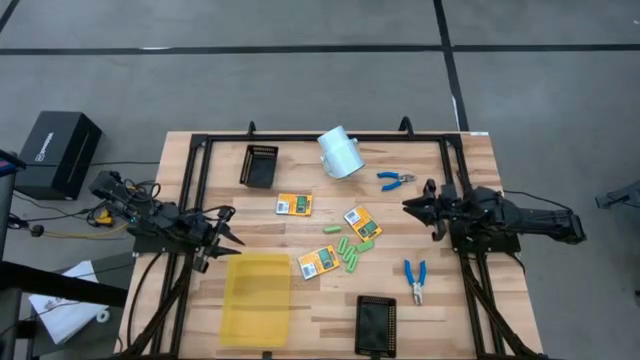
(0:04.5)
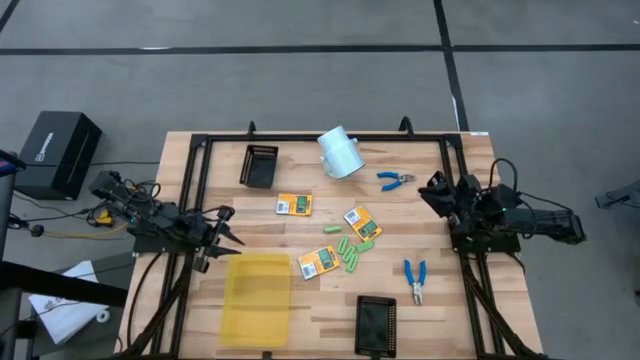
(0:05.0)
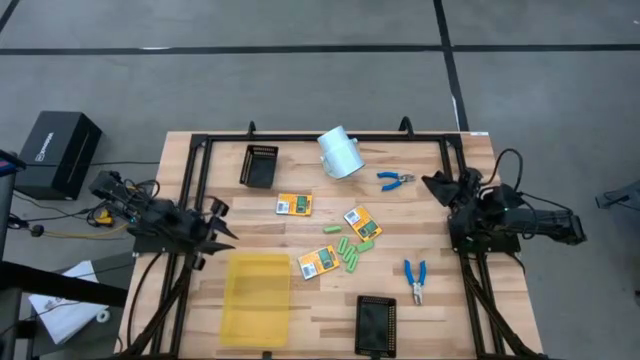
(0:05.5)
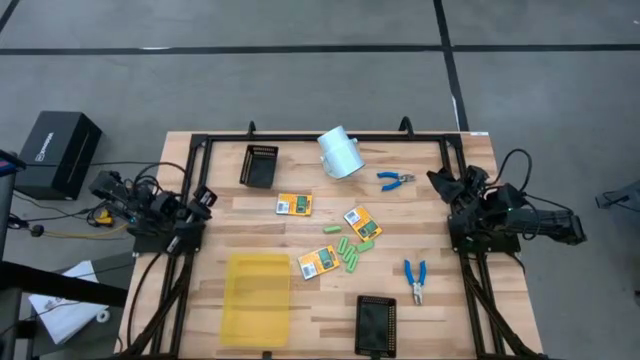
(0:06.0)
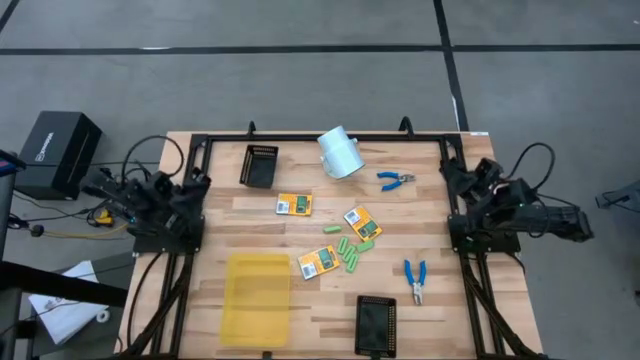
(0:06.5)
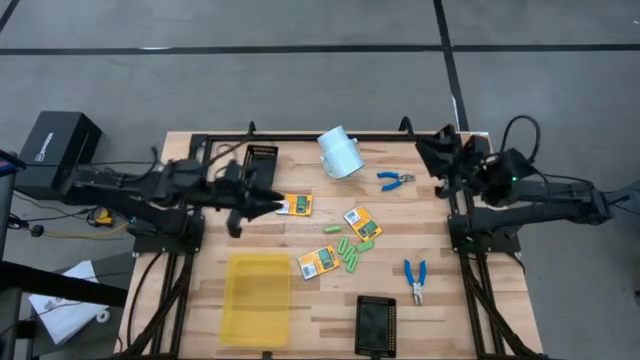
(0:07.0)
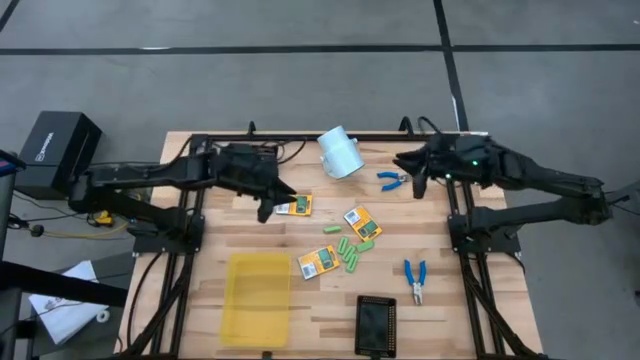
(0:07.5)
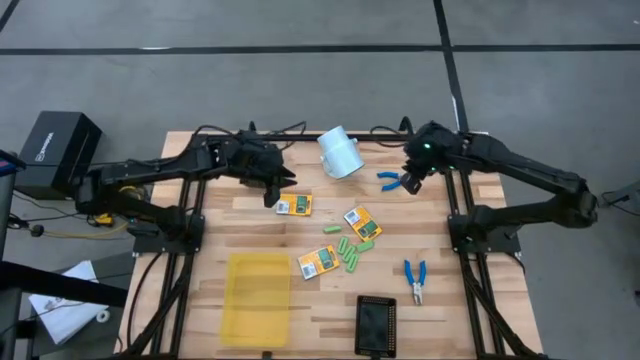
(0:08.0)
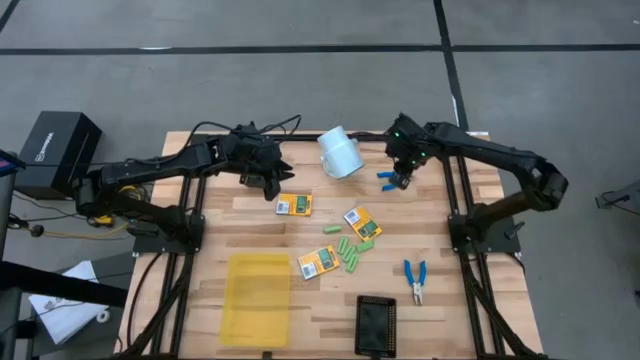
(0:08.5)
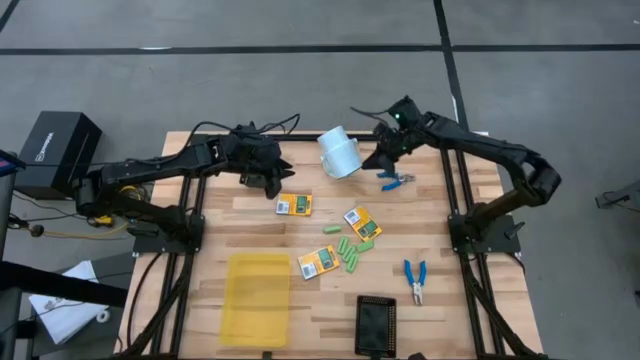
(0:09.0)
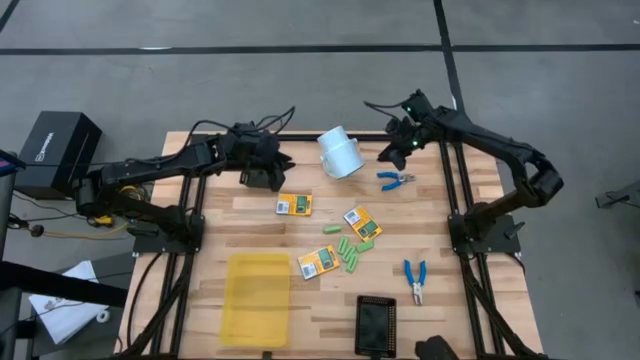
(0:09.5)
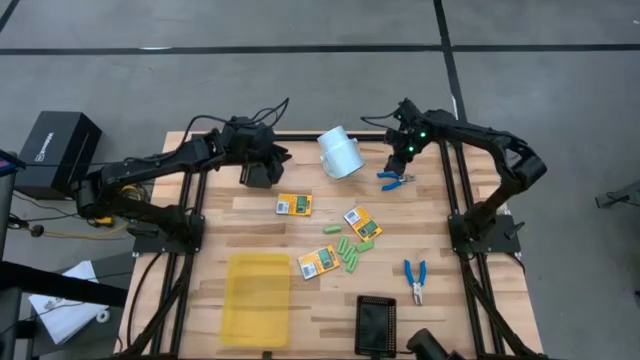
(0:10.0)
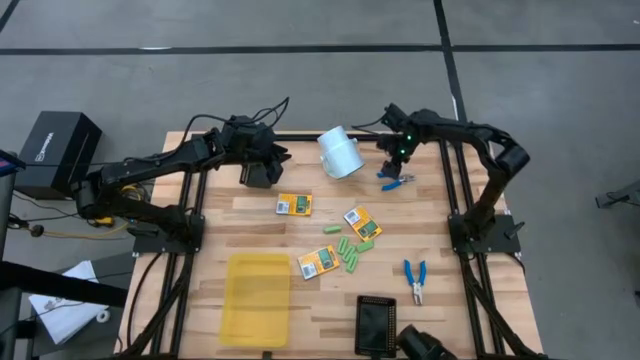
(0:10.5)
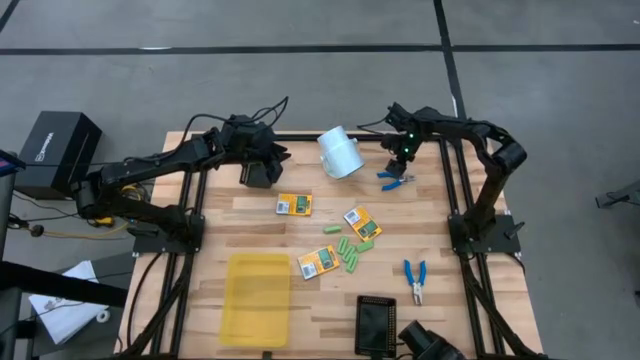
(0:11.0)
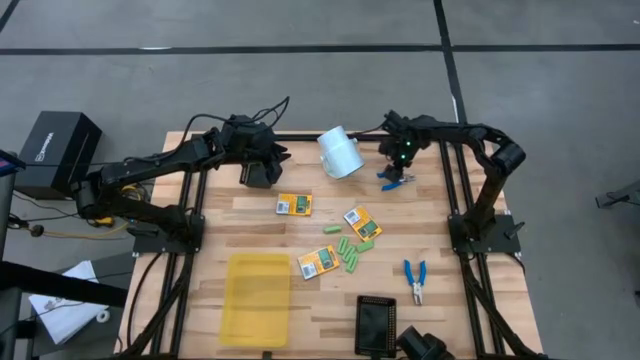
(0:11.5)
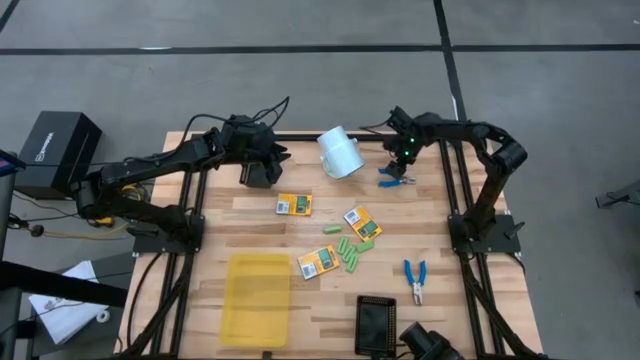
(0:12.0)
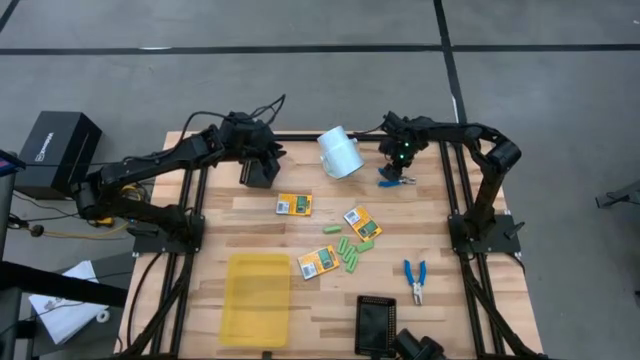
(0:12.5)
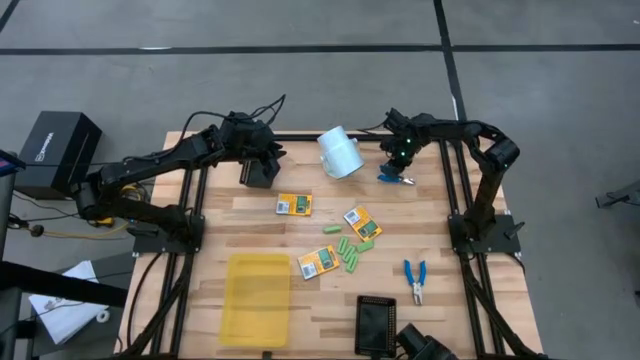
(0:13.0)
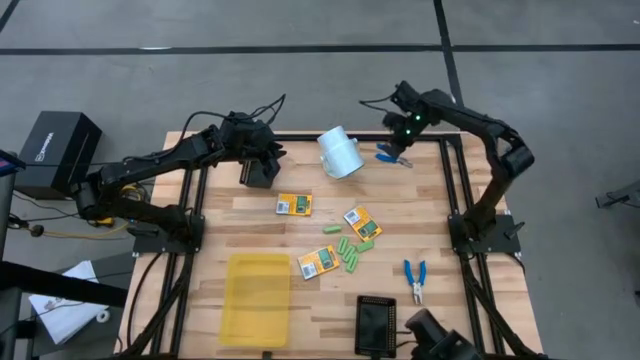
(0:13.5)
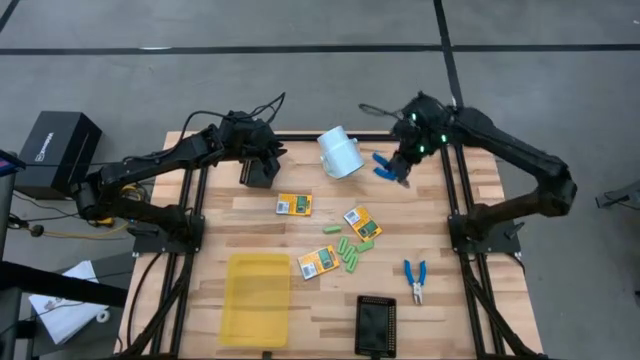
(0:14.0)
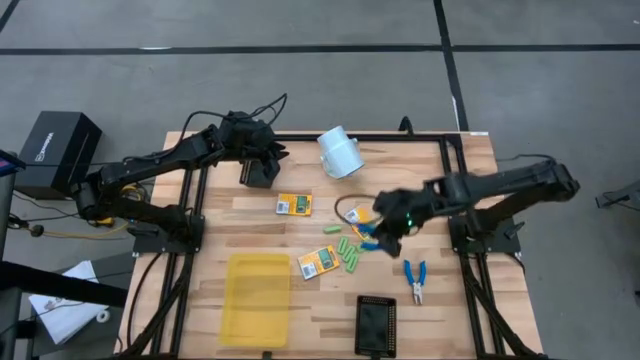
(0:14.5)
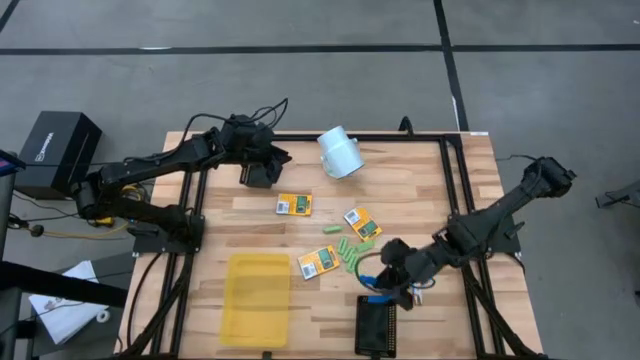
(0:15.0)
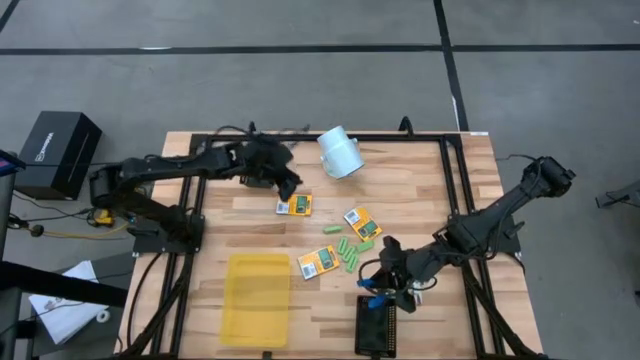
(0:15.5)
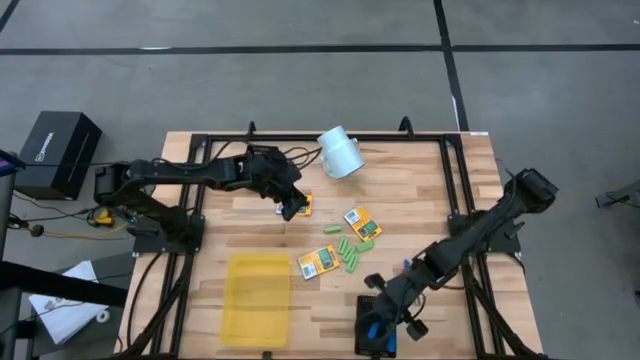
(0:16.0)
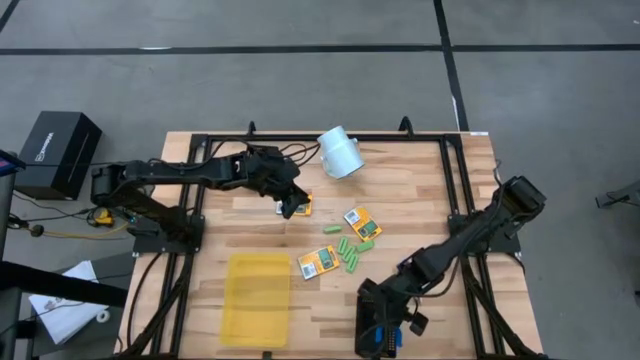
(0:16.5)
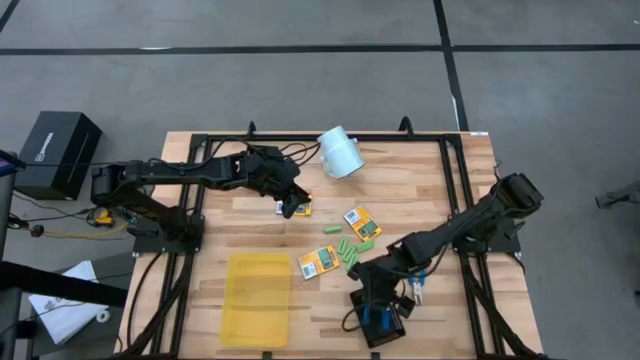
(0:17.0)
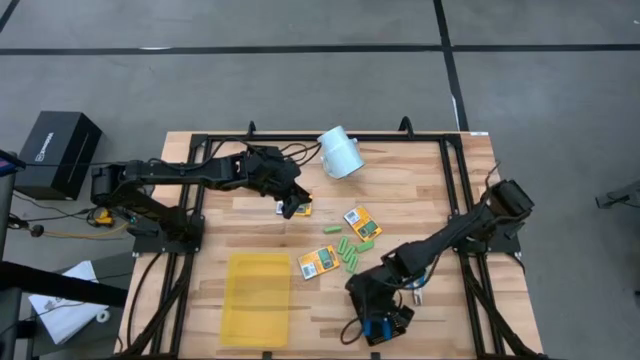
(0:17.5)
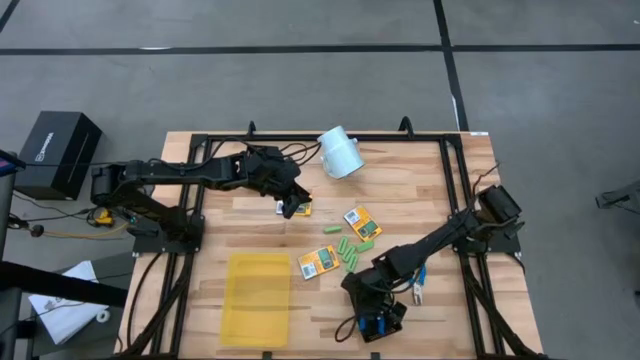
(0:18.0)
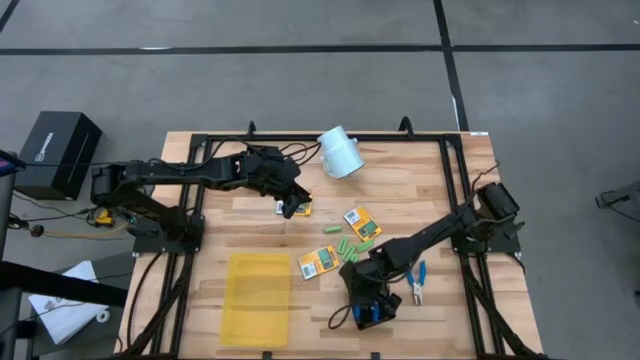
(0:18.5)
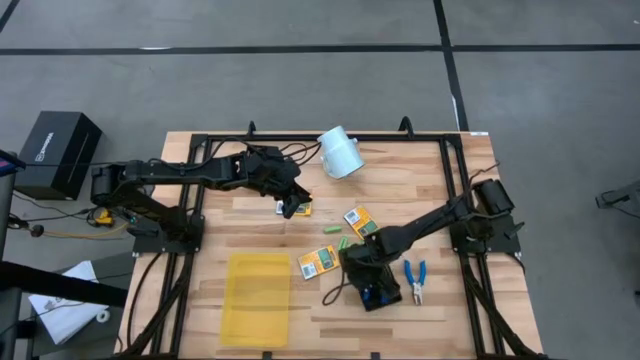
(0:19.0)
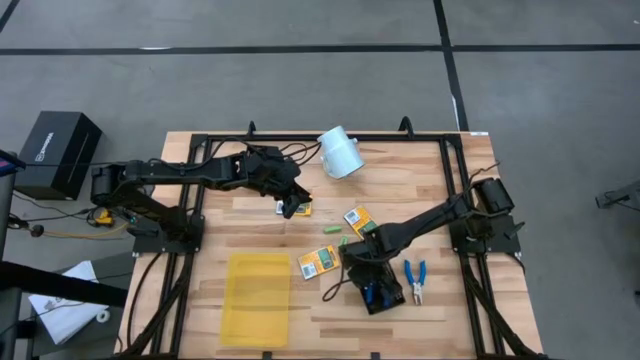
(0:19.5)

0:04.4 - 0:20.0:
Task: Pick & Place School Supplies
Put the blue hole puncher into the bottom black bin

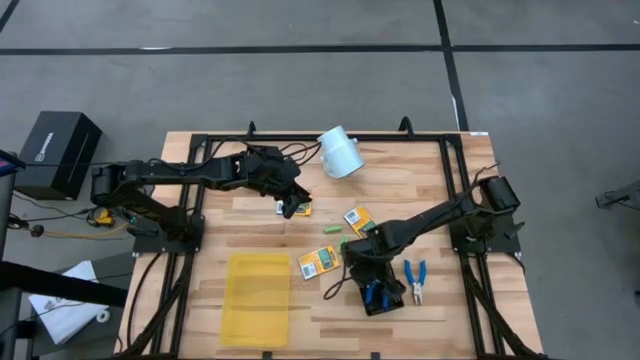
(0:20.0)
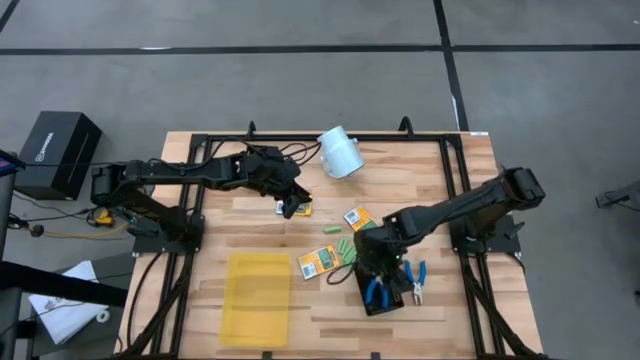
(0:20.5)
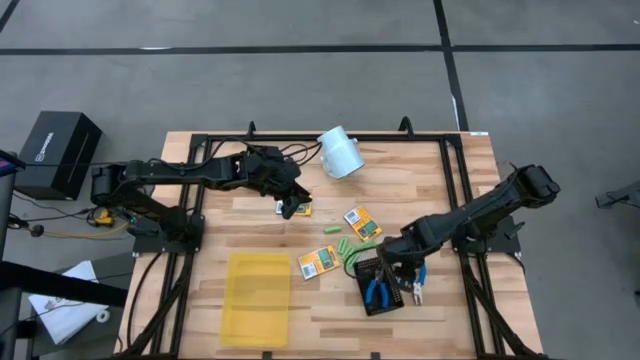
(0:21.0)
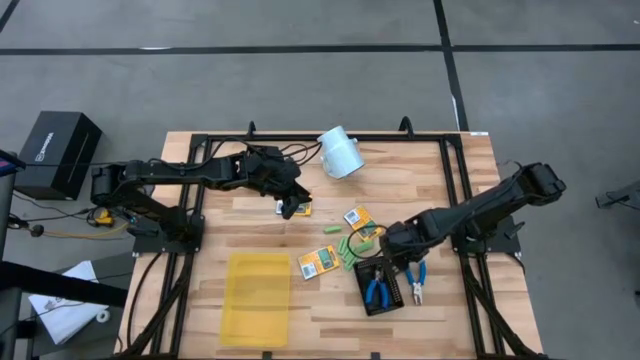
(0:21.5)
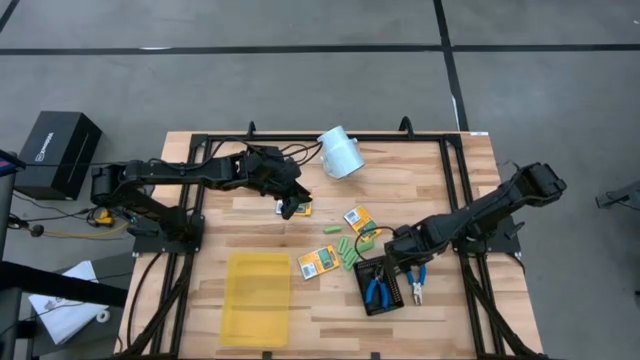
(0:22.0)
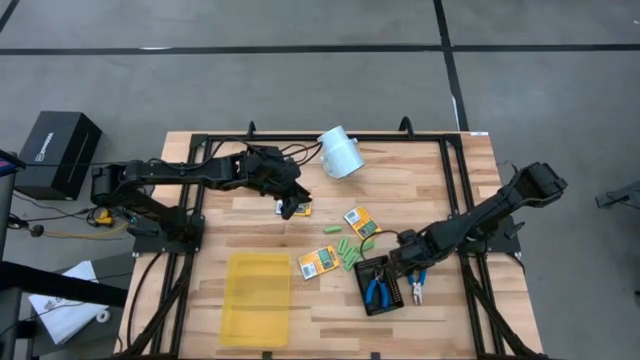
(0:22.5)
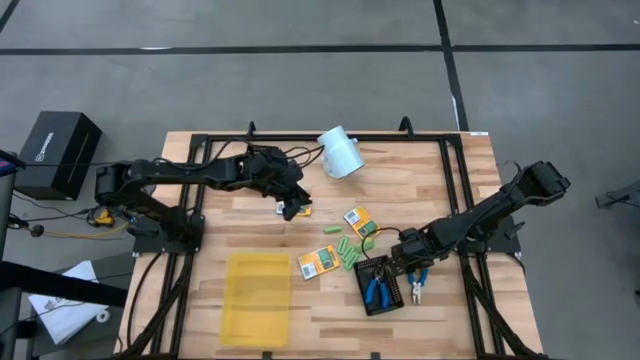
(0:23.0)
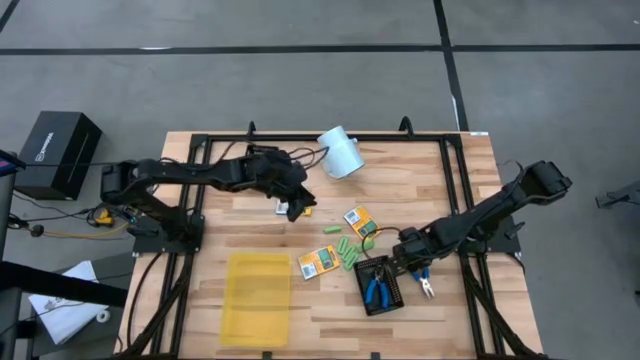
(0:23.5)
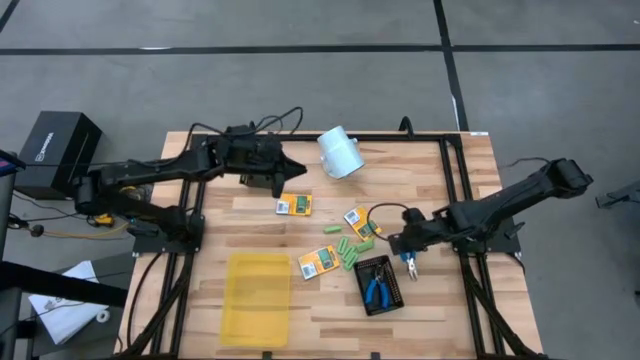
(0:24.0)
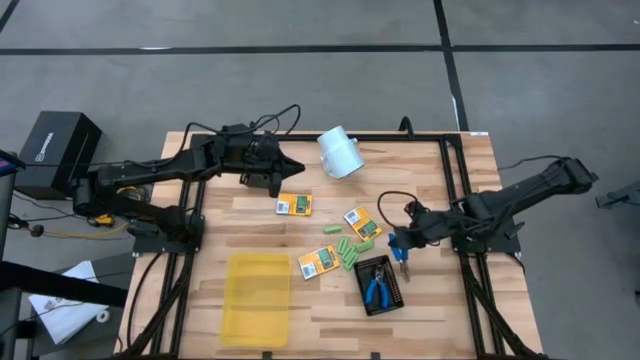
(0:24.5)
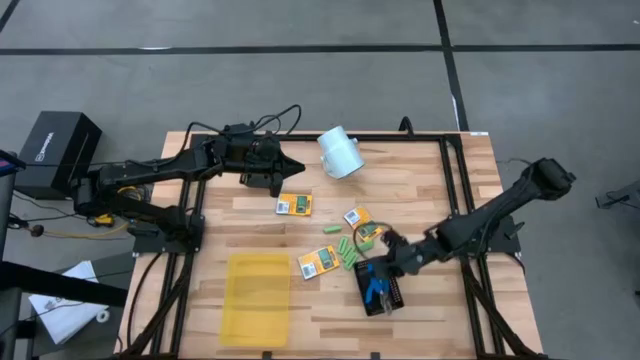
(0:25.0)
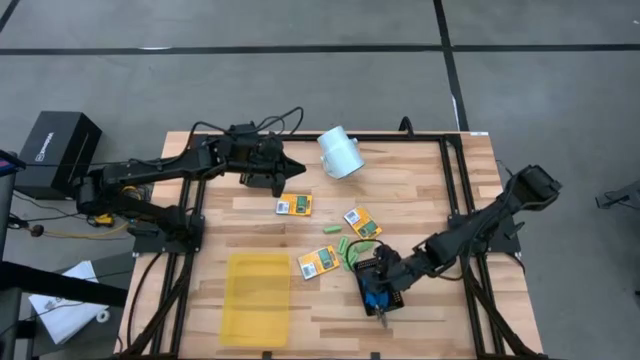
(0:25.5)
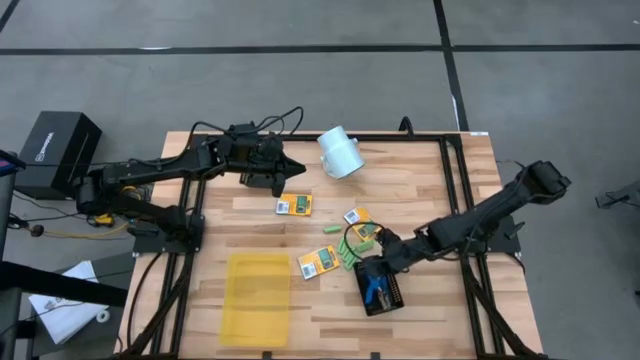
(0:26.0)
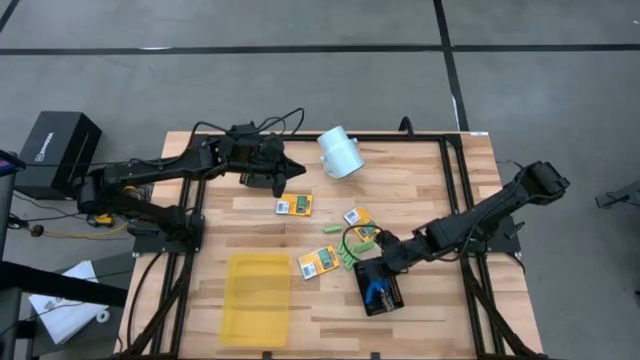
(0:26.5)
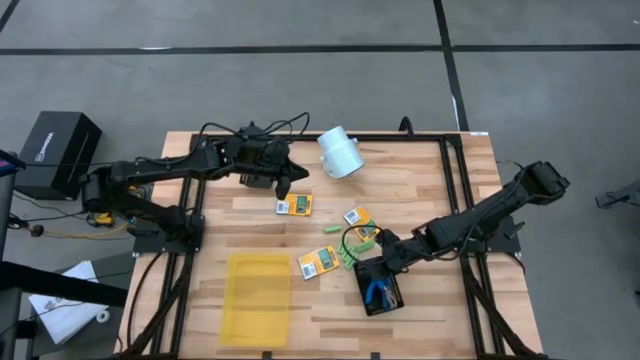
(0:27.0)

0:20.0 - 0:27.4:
Put the blue hole puncher into the bottom black bin
